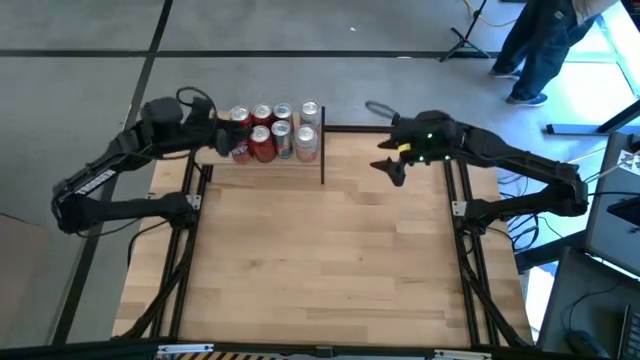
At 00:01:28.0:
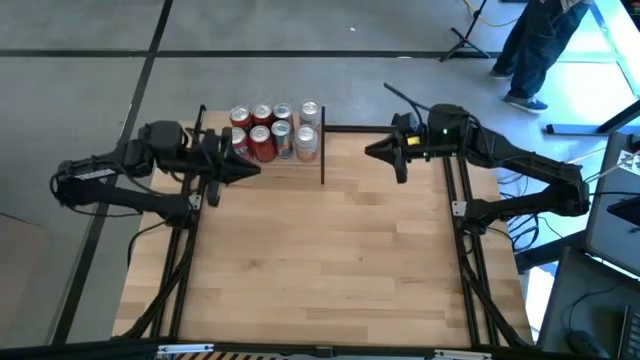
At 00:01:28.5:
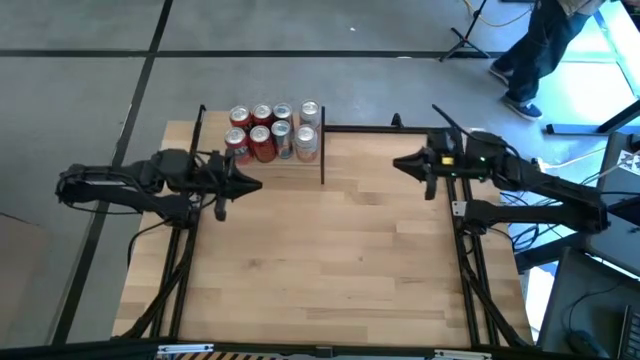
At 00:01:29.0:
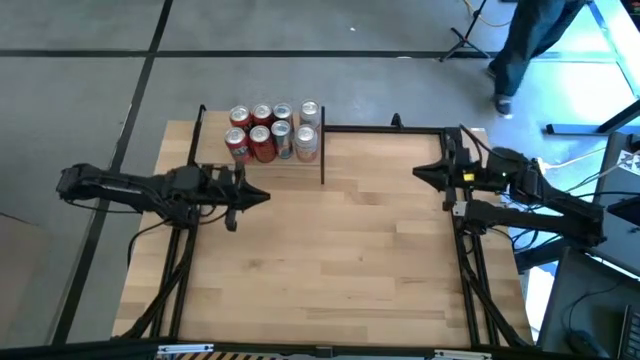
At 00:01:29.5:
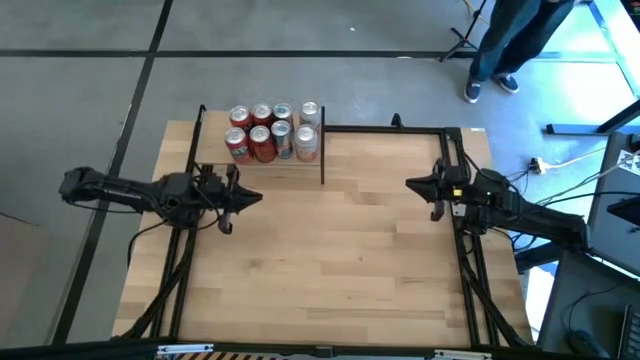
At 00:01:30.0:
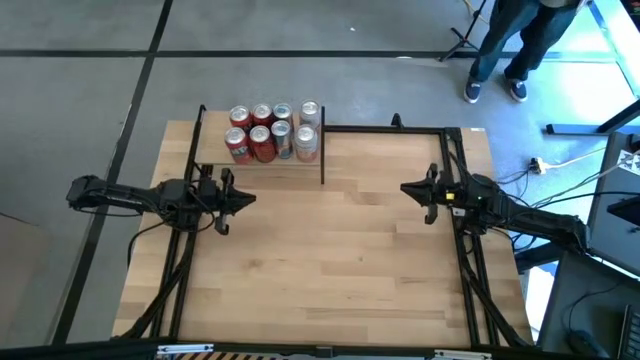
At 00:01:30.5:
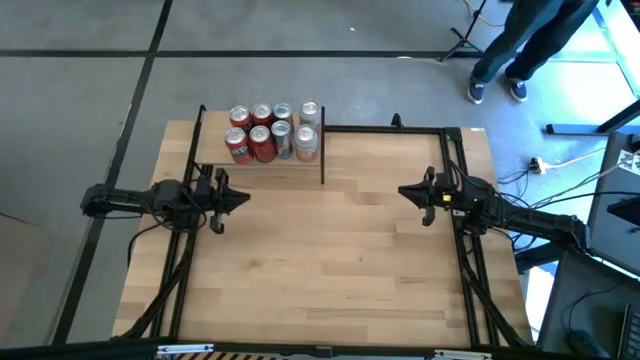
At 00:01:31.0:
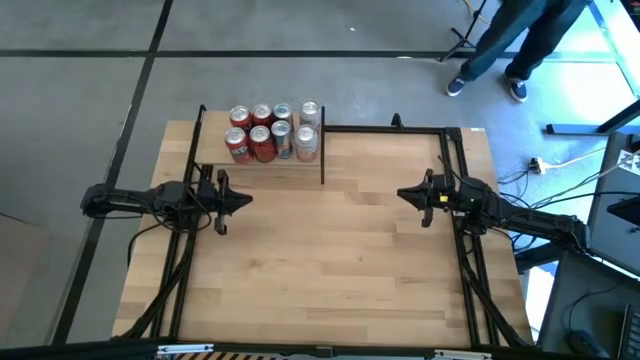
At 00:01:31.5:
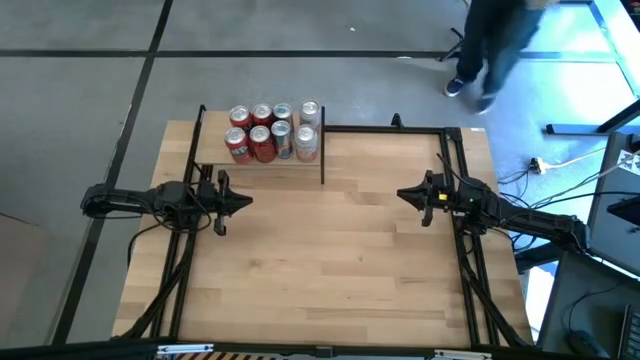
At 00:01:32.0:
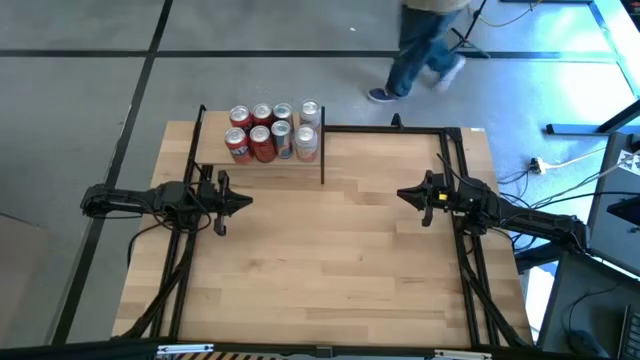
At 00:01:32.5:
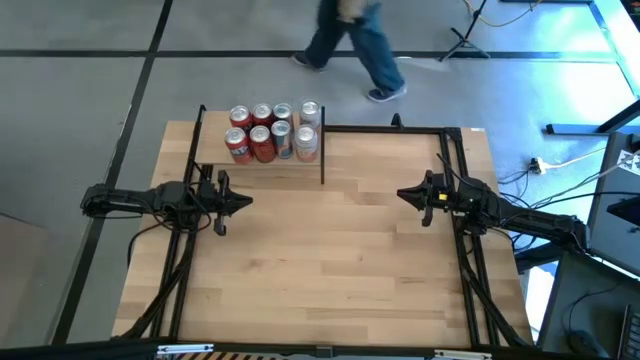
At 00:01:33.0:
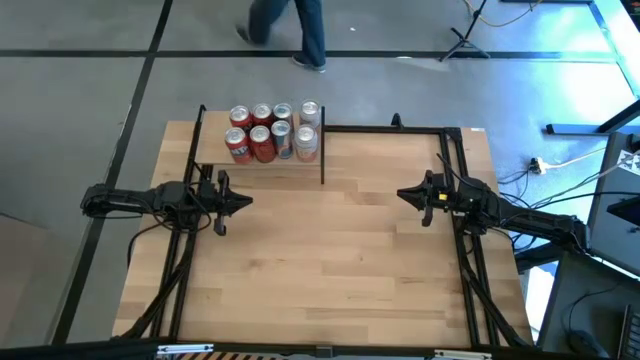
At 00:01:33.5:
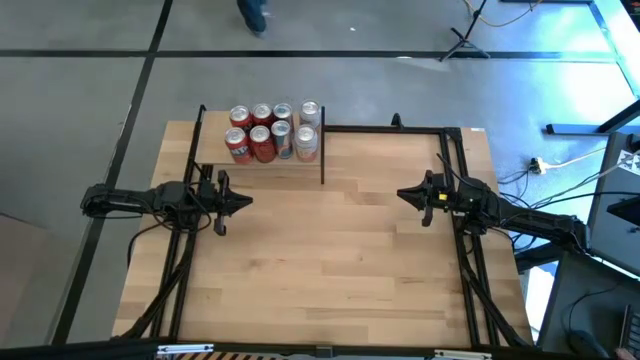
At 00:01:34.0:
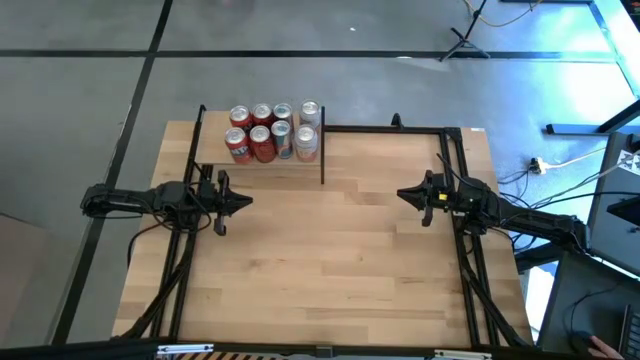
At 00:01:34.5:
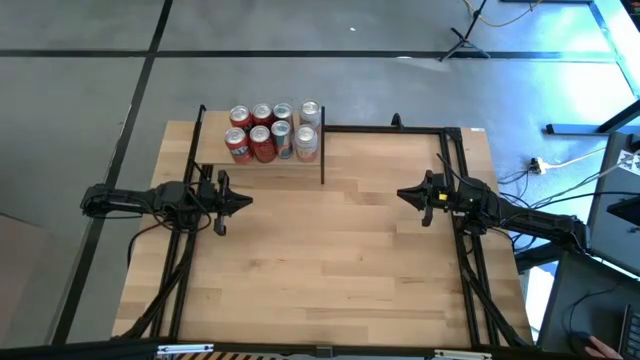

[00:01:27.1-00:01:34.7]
Task: Place canned beverage on shelf
Return to Home Position

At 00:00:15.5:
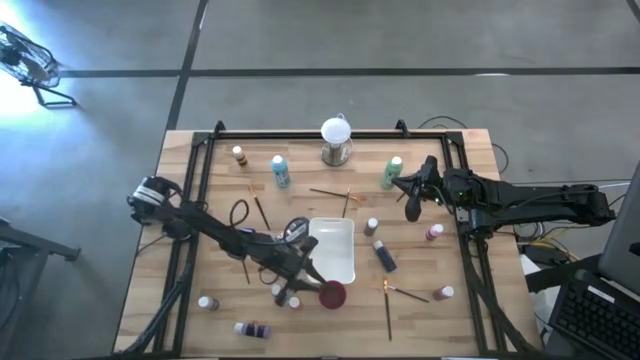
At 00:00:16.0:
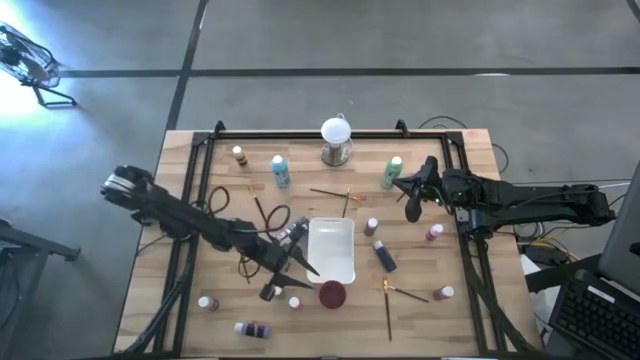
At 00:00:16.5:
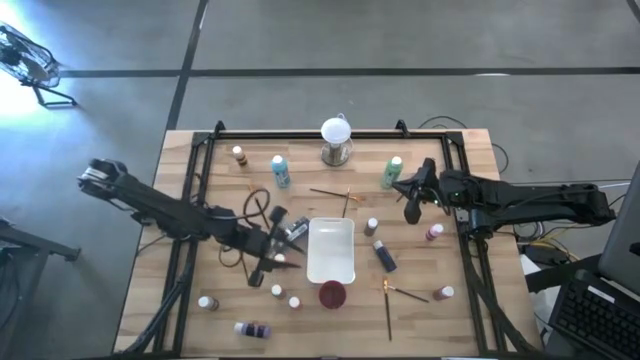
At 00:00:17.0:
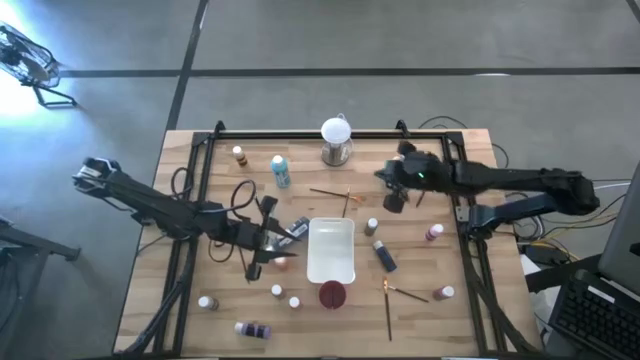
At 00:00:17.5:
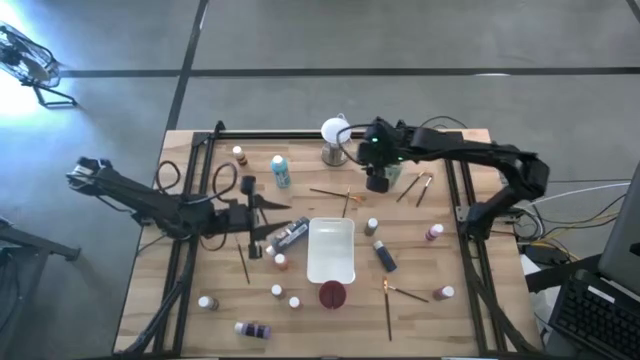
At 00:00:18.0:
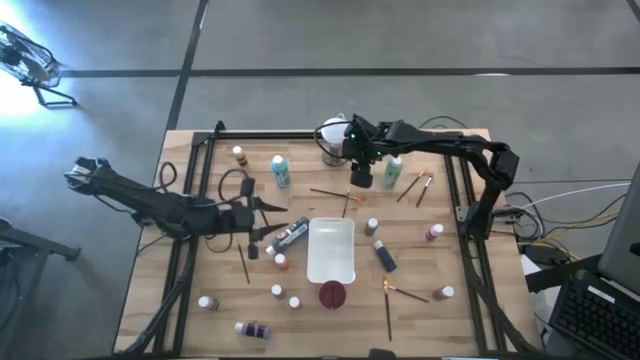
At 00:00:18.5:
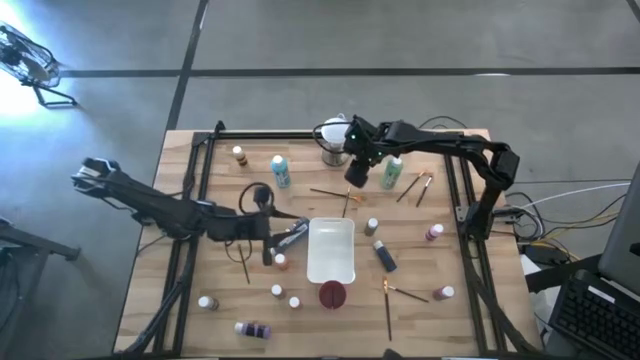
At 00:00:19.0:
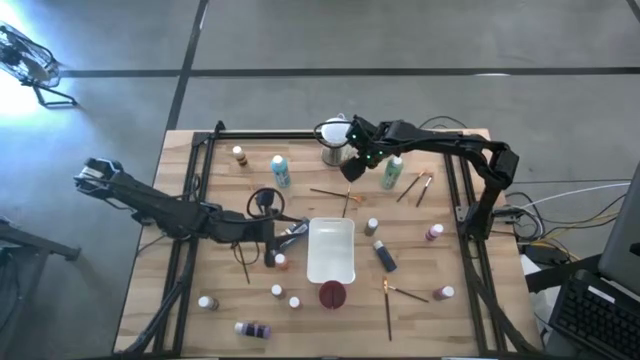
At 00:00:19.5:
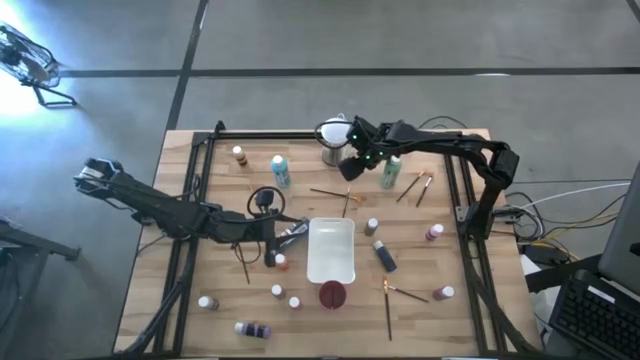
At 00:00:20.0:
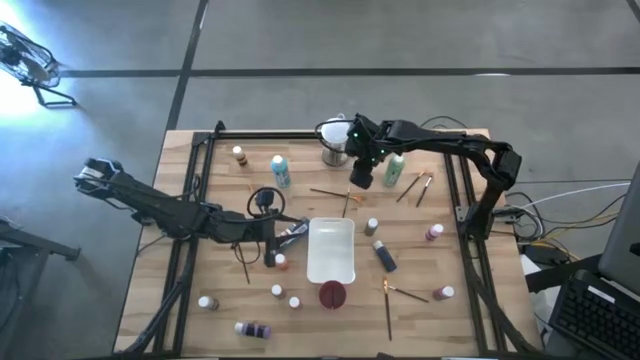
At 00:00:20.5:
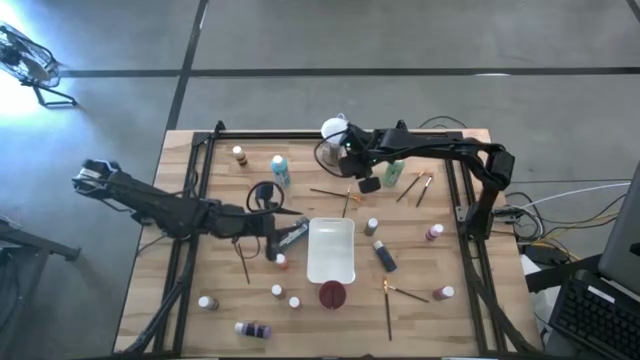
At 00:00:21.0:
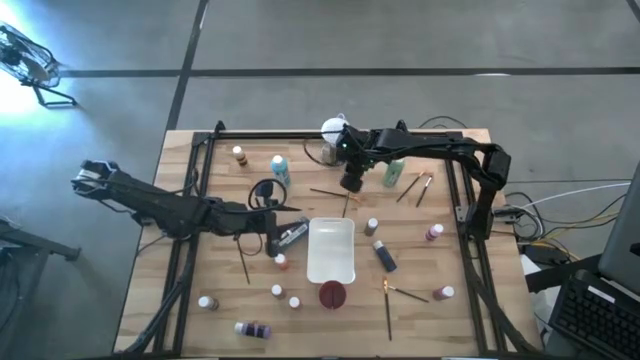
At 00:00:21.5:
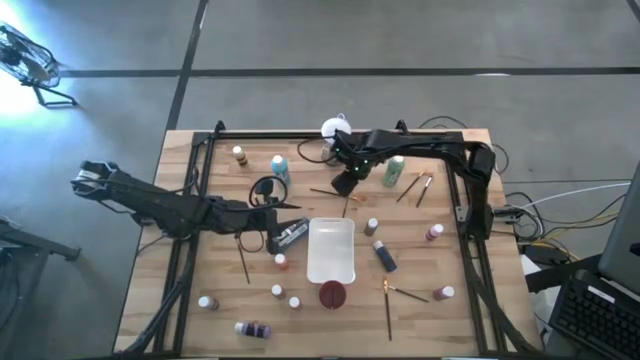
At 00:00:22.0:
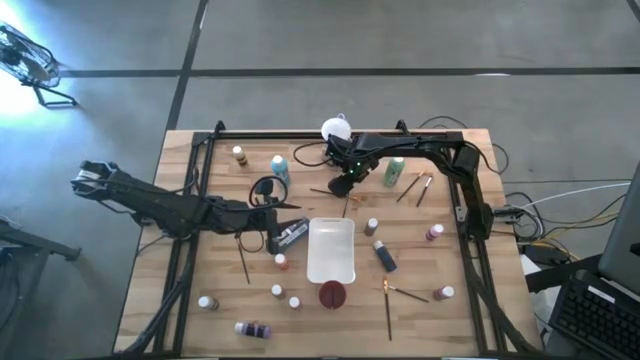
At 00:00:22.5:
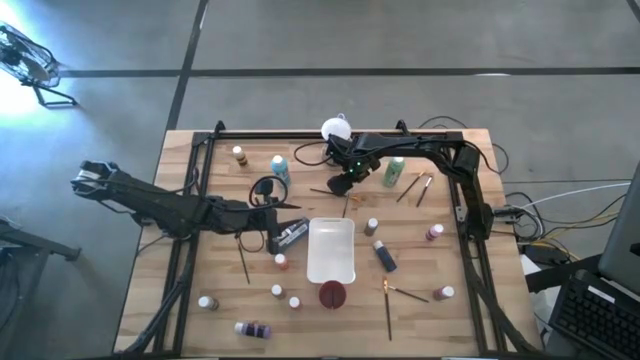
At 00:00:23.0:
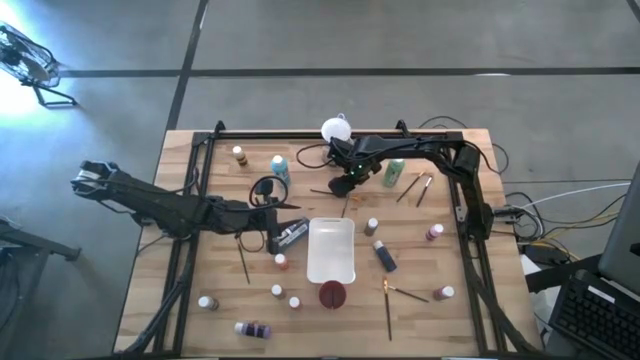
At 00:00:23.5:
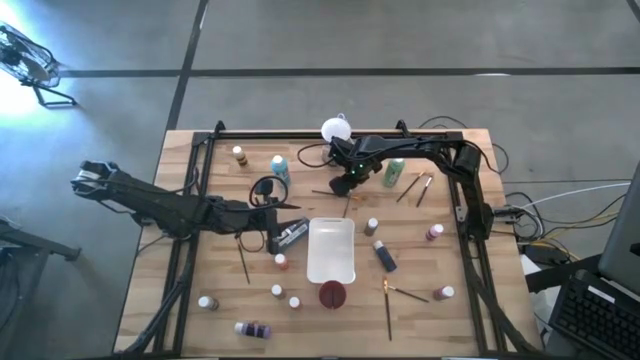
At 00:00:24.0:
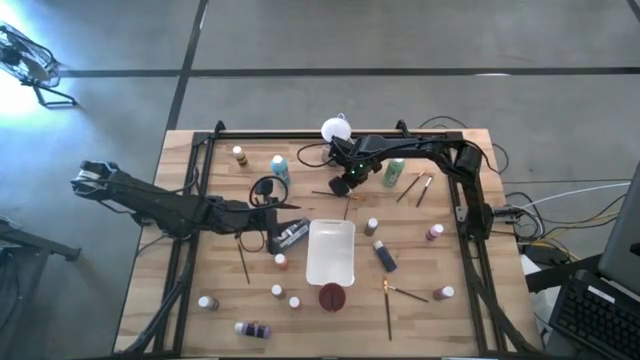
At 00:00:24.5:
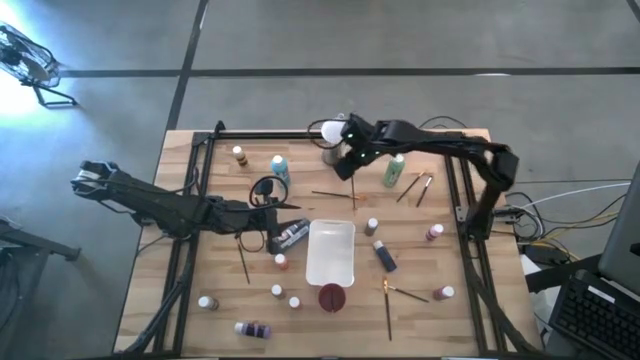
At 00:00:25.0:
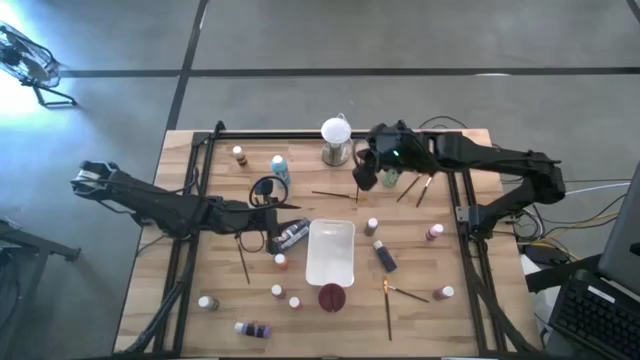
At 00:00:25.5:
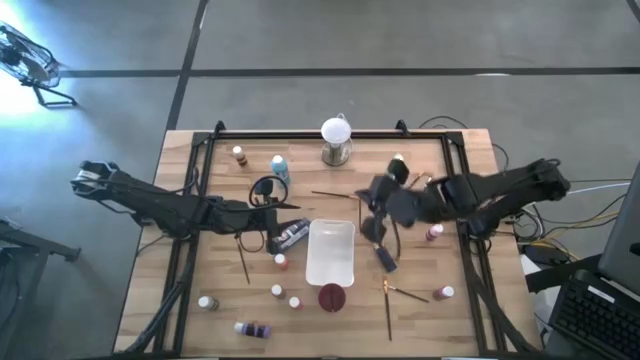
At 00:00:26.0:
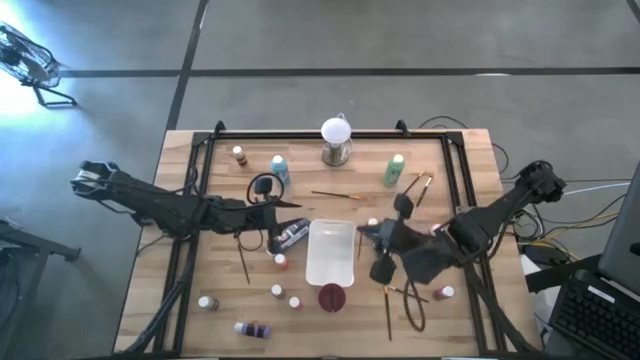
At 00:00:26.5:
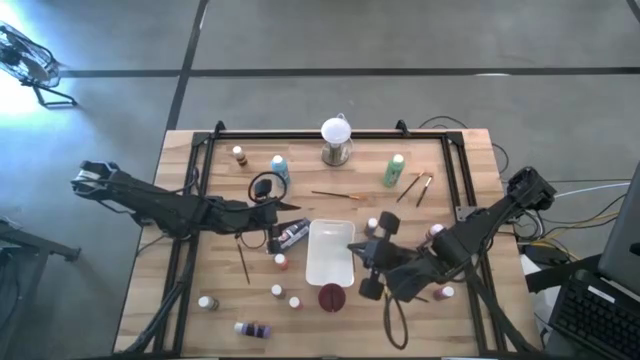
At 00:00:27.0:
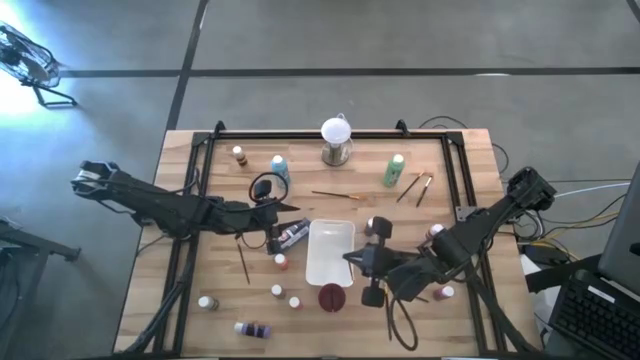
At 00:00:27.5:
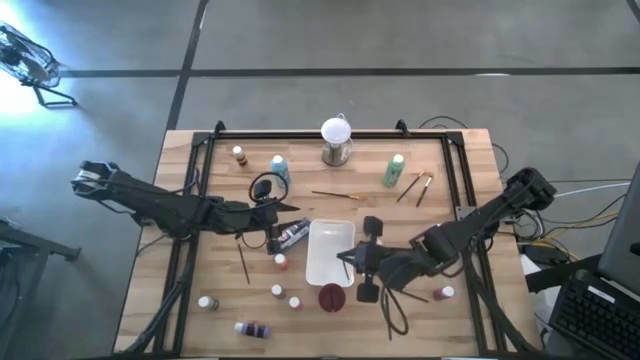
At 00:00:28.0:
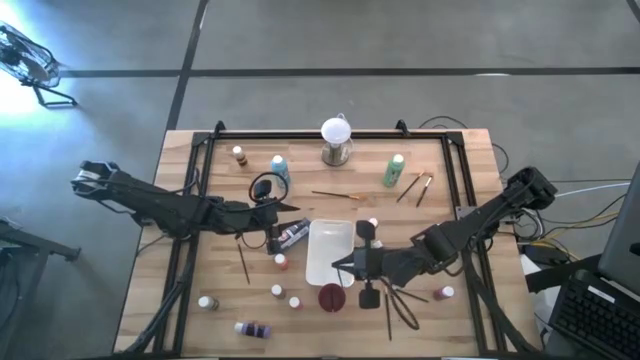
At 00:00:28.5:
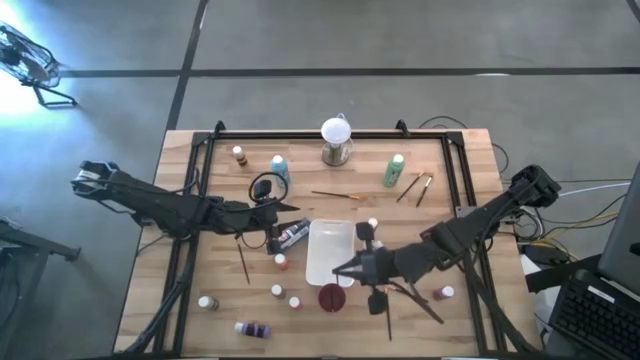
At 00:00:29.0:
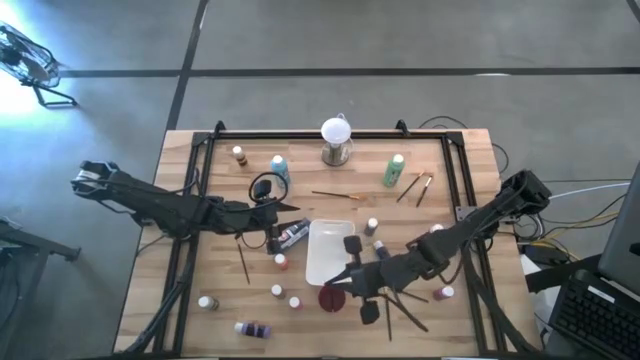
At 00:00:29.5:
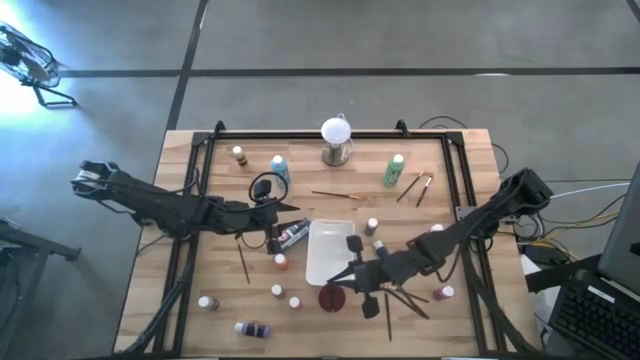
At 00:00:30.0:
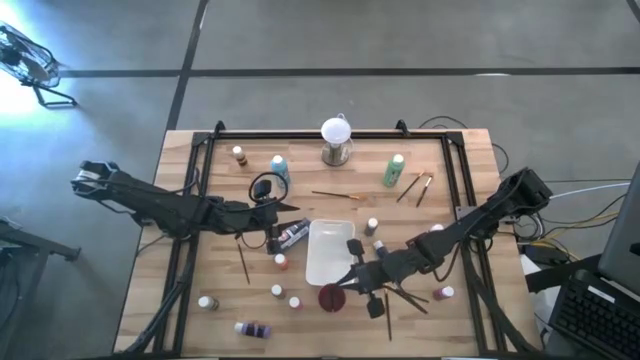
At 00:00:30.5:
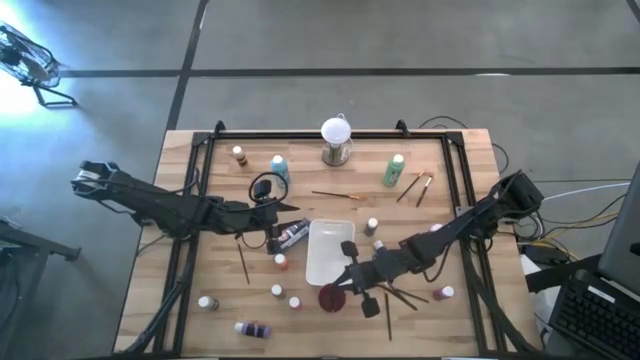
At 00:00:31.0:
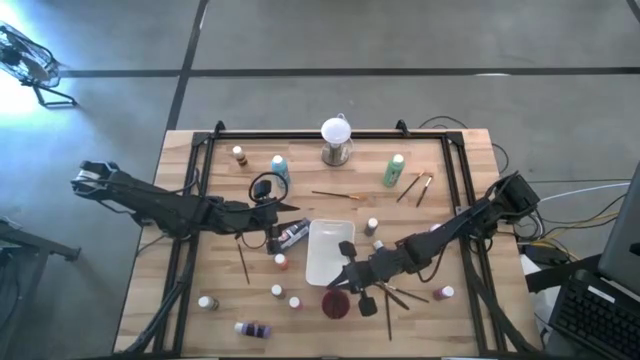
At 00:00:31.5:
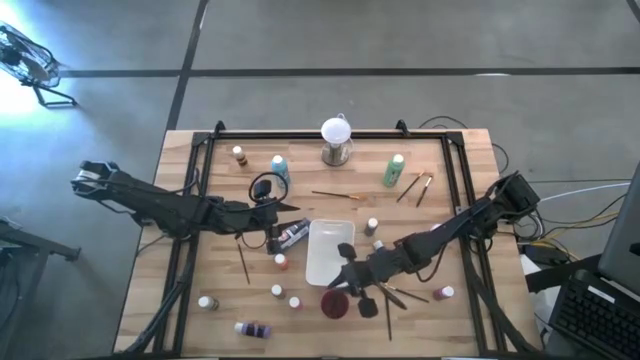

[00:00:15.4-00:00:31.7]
Task: Pick & Place Paint Supplies
Put the gold paint brush into the red cup
